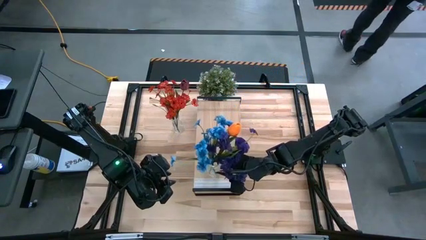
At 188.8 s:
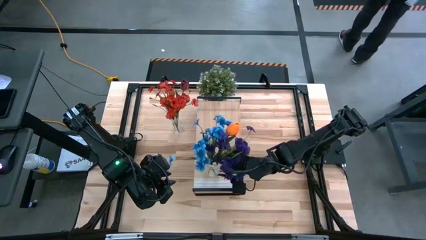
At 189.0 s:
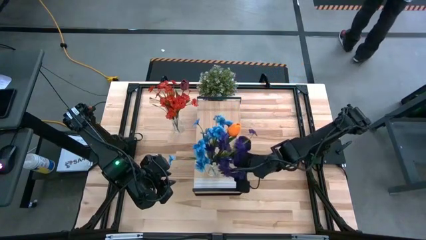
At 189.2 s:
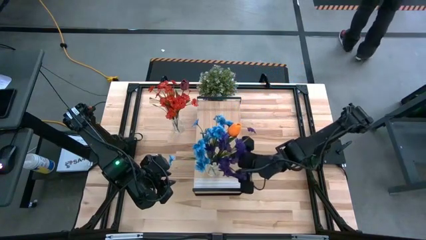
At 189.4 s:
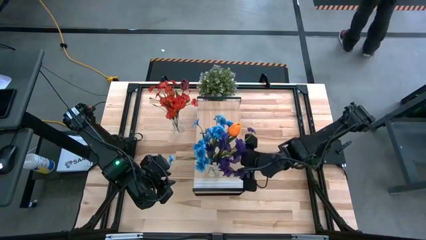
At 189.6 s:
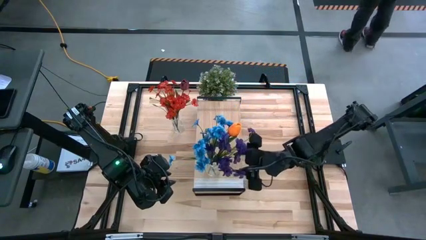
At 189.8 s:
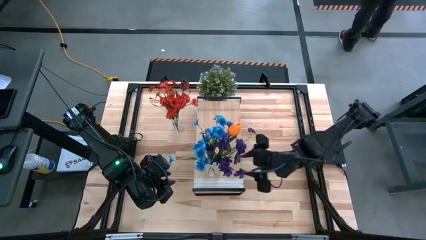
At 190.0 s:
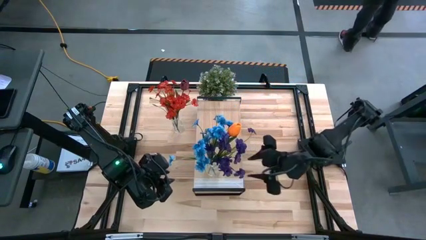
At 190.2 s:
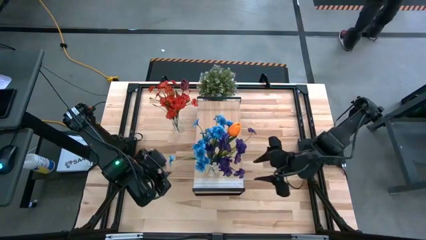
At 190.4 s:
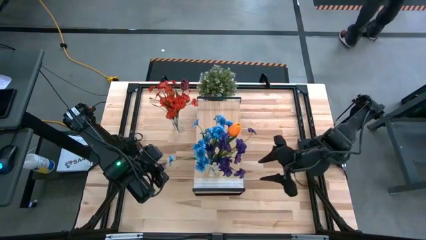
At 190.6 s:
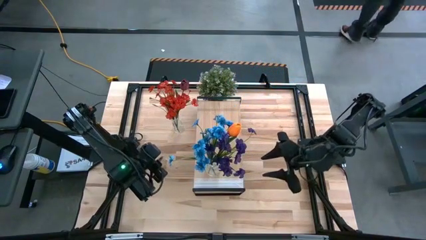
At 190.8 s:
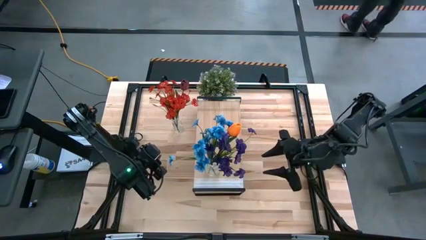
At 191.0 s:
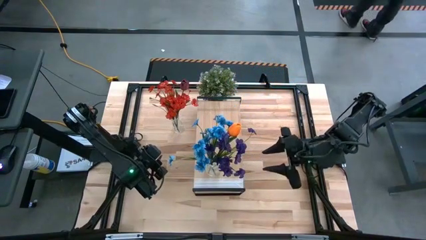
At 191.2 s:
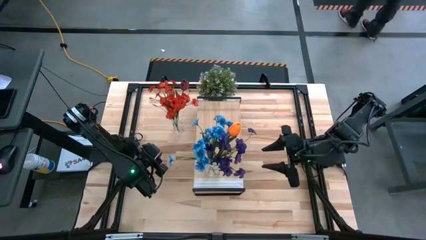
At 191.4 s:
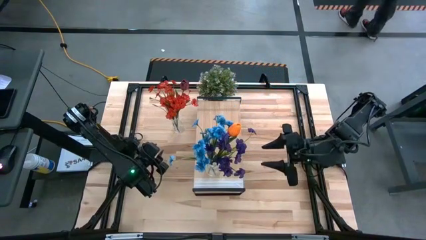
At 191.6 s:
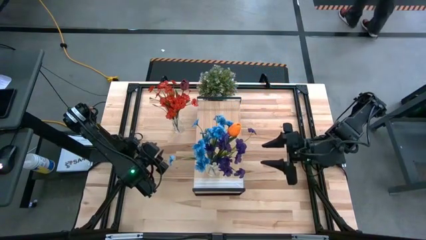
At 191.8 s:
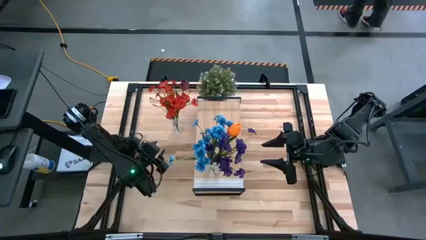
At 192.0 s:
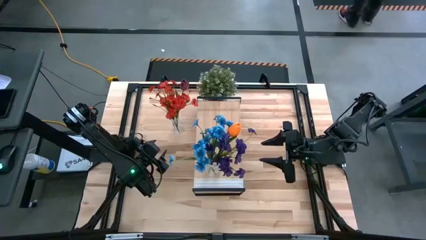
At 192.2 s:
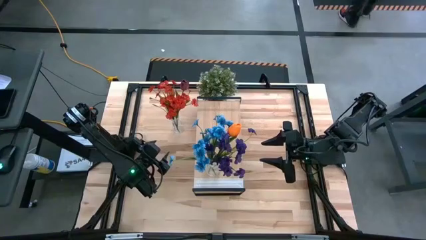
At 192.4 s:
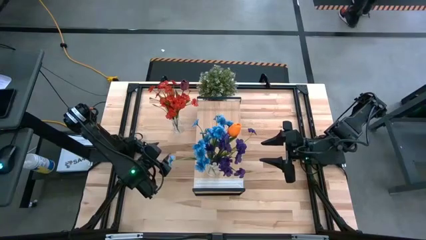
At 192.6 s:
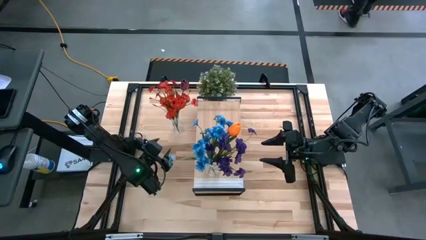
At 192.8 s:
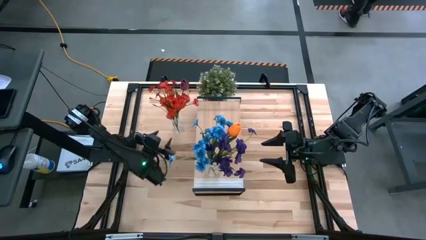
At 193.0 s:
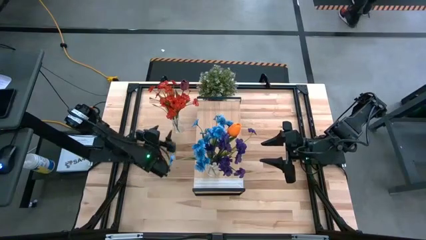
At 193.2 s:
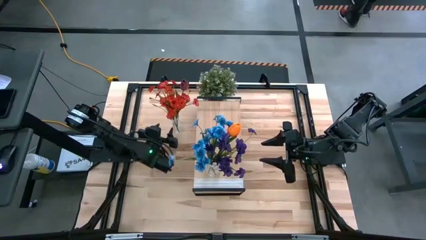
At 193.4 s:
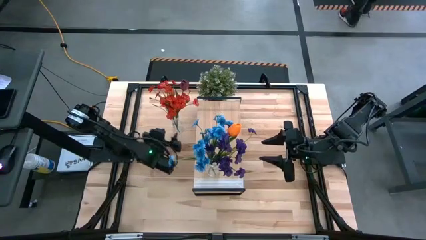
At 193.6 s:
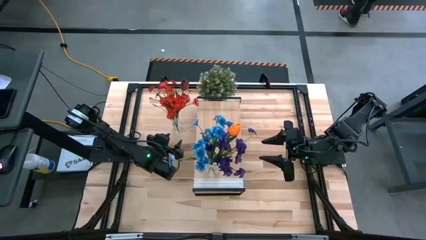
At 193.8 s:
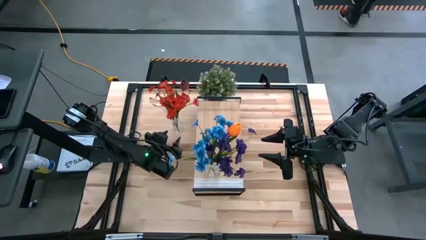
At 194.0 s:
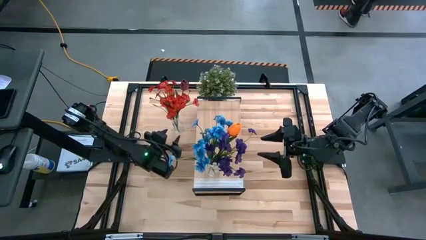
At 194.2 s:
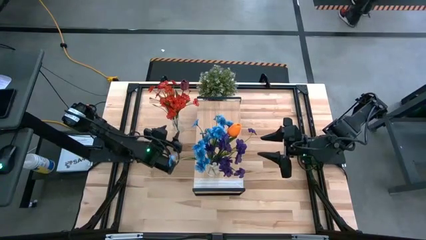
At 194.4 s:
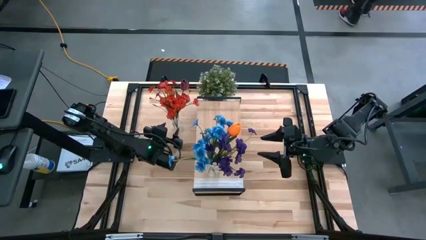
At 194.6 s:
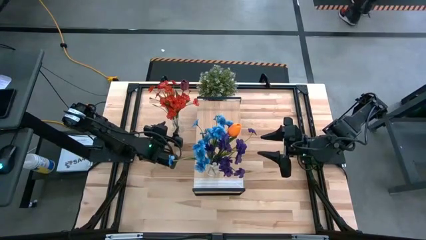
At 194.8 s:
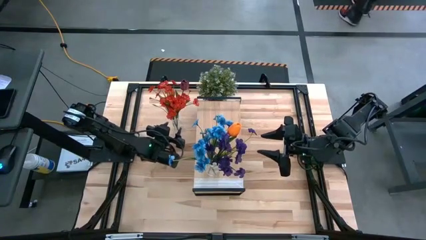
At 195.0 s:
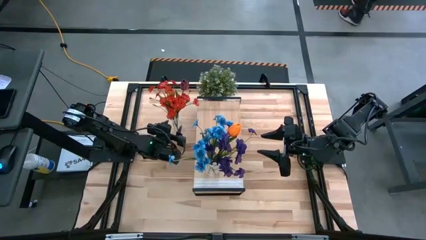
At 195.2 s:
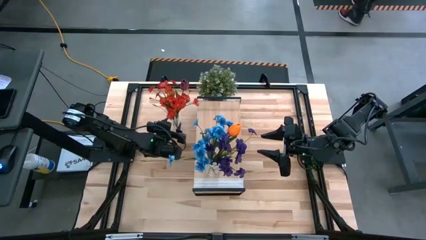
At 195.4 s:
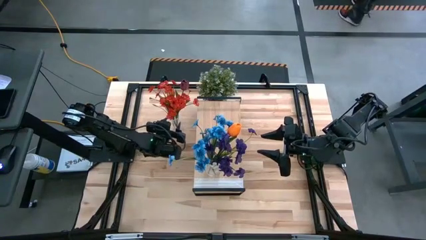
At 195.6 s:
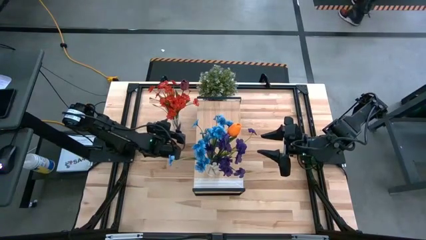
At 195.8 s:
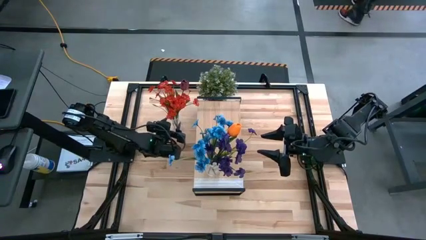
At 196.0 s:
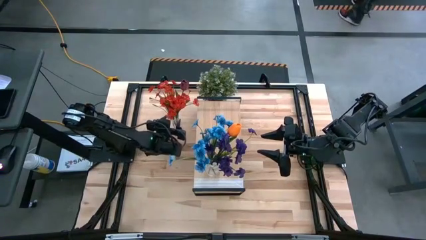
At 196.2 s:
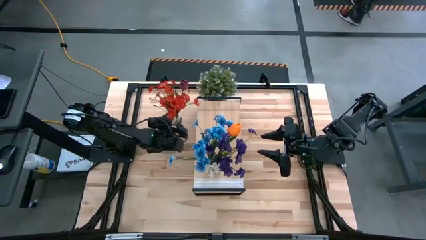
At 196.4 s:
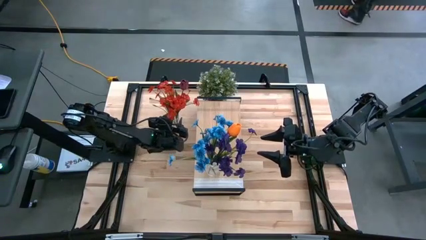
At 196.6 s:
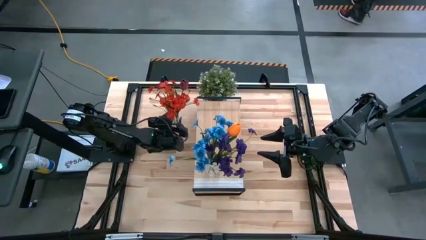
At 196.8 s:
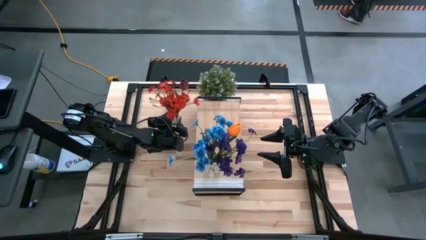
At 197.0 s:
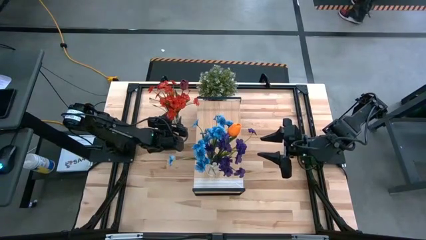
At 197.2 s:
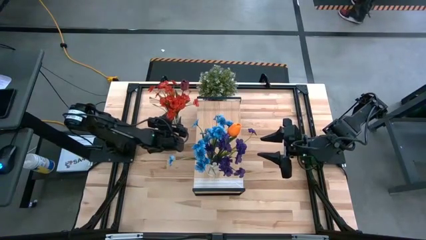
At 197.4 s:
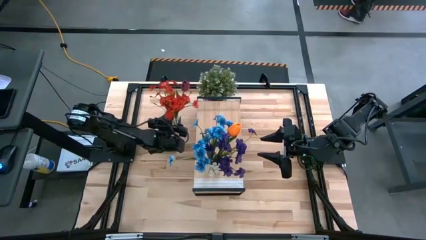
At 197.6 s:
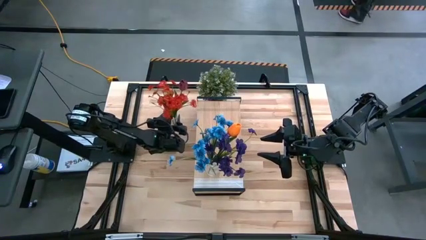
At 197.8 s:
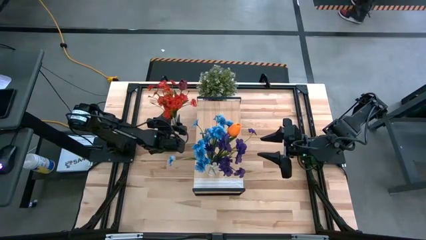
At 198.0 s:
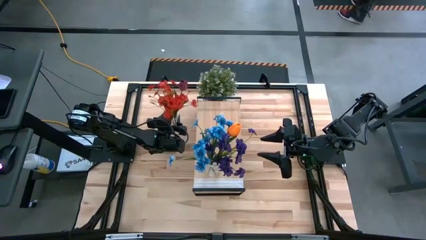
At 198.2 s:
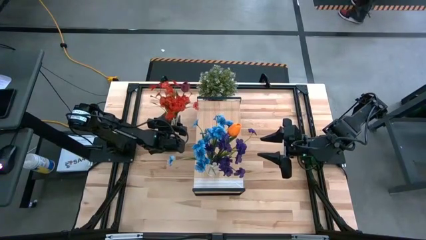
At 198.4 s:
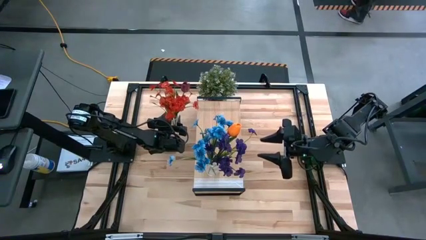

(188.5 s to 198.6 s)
Task: Pick and place flowers into a vace then onto a shelf
Put the left transparent vase on the shelf

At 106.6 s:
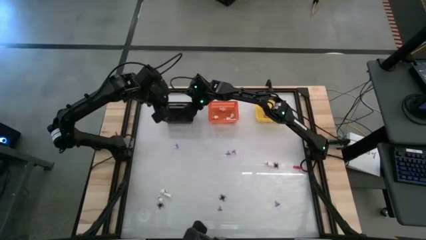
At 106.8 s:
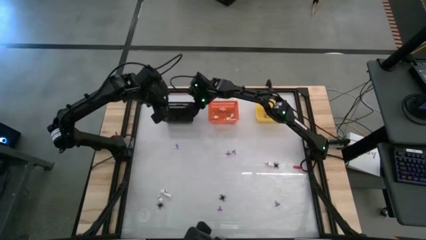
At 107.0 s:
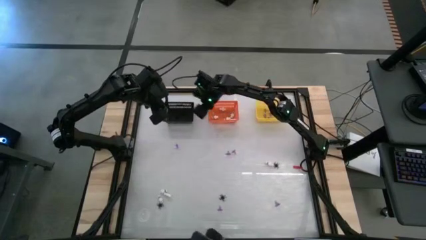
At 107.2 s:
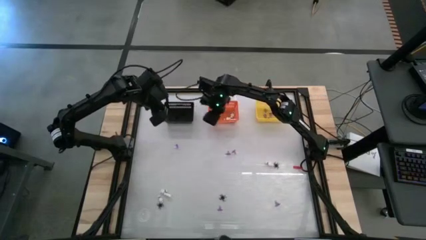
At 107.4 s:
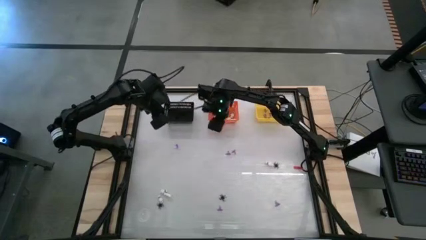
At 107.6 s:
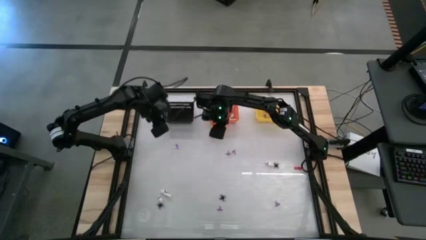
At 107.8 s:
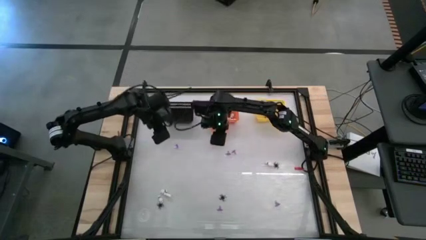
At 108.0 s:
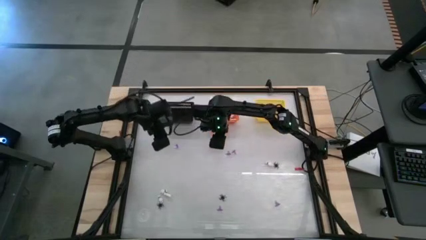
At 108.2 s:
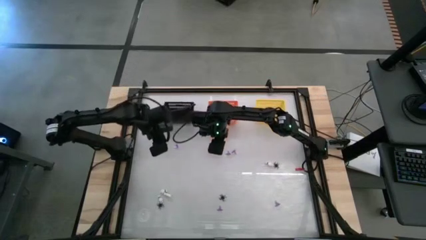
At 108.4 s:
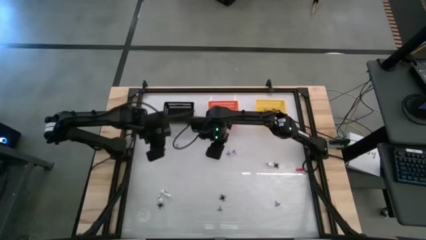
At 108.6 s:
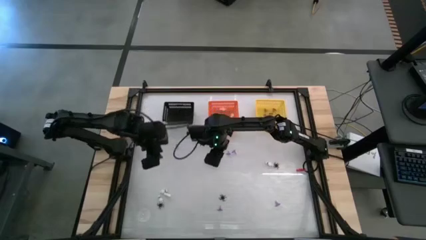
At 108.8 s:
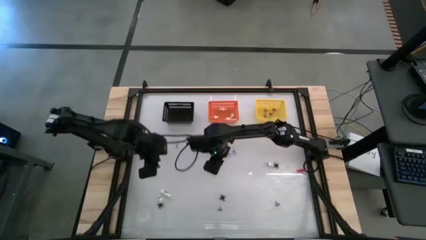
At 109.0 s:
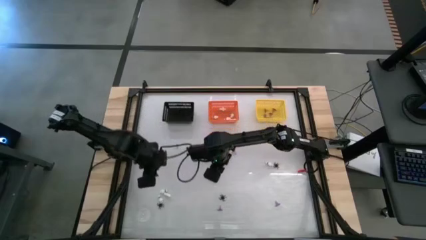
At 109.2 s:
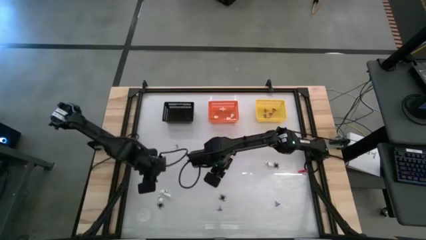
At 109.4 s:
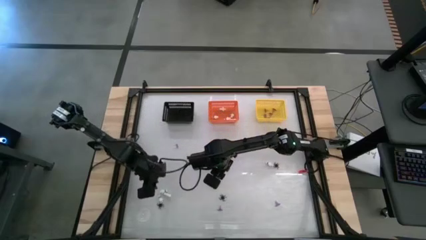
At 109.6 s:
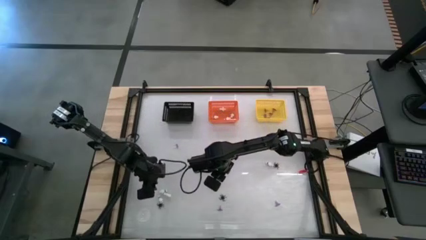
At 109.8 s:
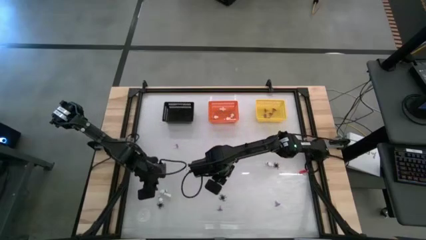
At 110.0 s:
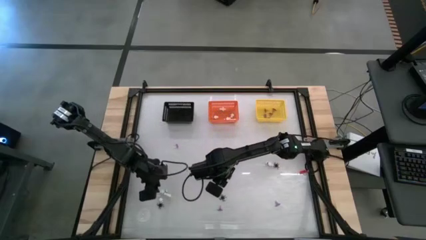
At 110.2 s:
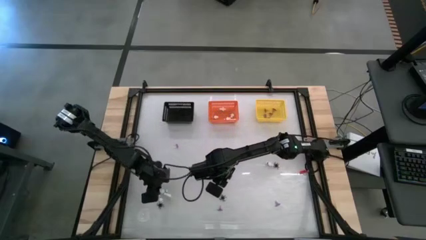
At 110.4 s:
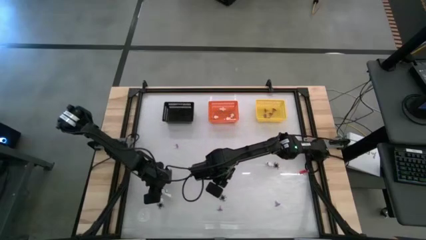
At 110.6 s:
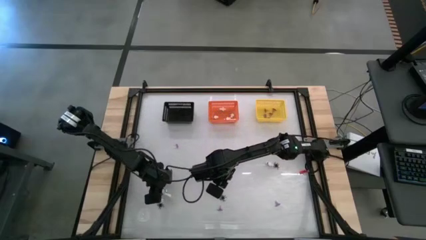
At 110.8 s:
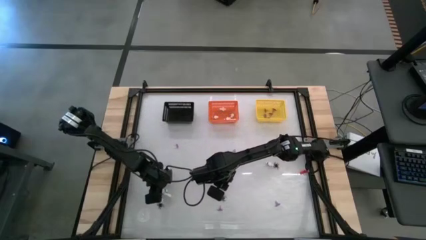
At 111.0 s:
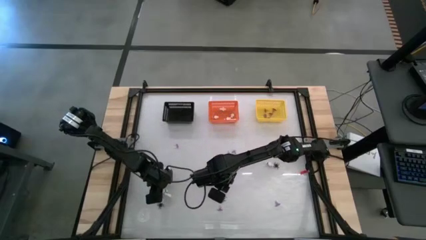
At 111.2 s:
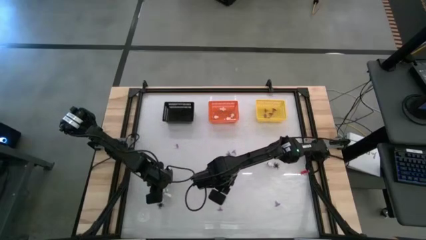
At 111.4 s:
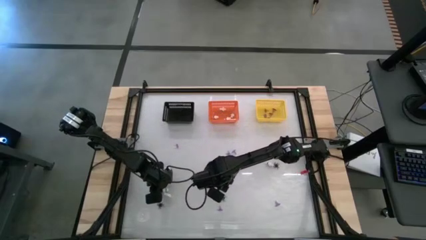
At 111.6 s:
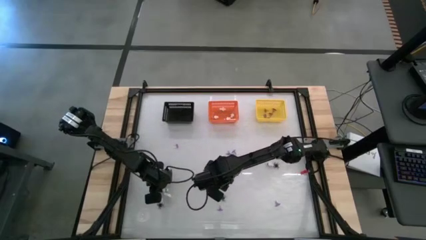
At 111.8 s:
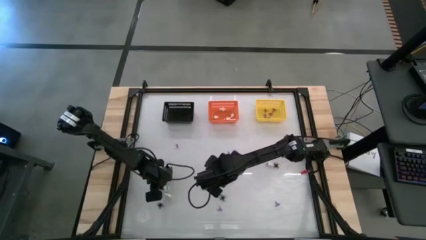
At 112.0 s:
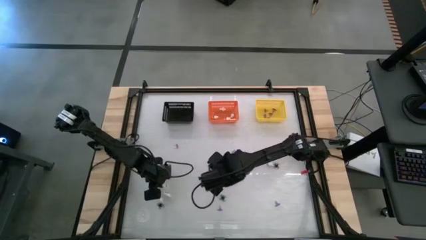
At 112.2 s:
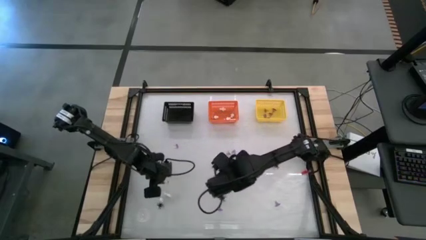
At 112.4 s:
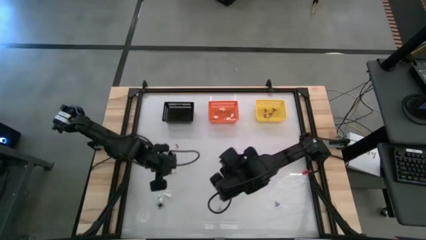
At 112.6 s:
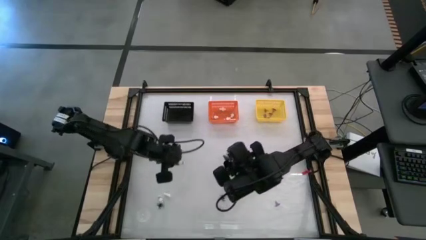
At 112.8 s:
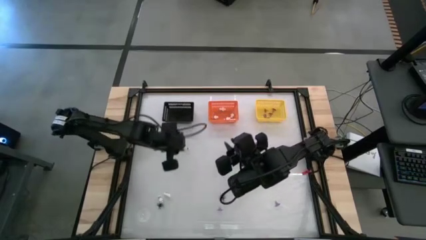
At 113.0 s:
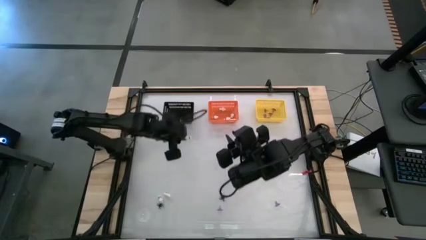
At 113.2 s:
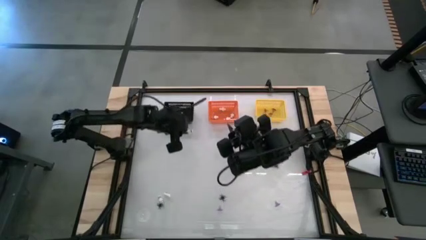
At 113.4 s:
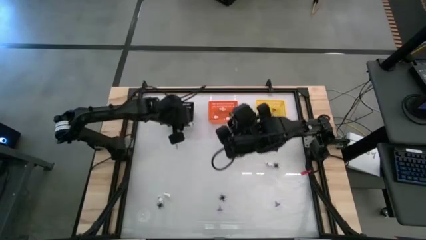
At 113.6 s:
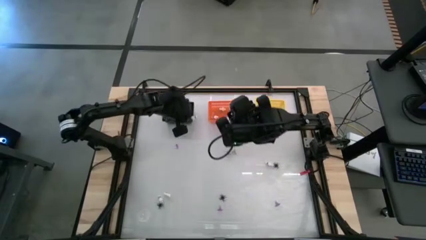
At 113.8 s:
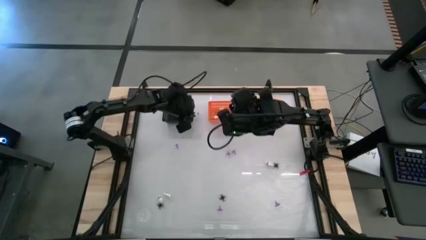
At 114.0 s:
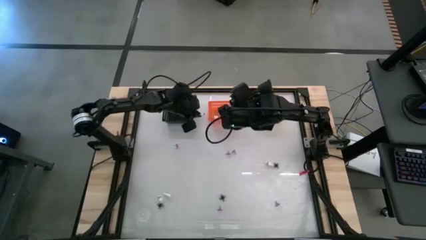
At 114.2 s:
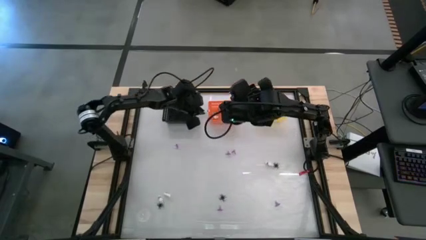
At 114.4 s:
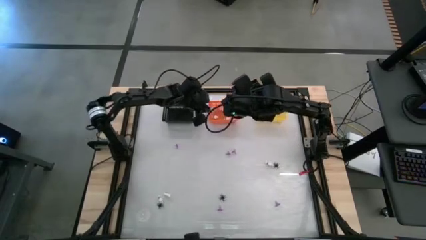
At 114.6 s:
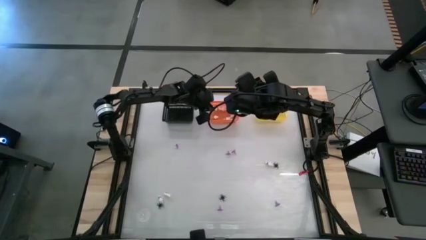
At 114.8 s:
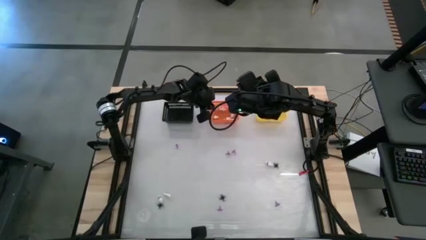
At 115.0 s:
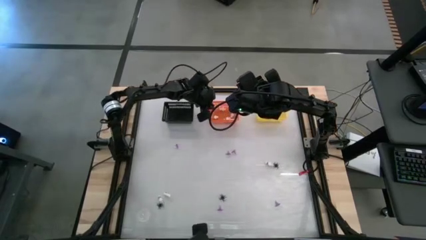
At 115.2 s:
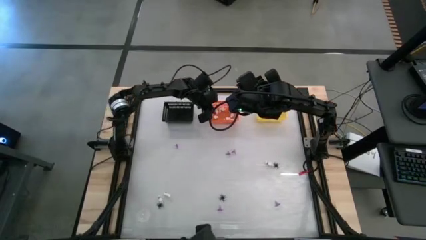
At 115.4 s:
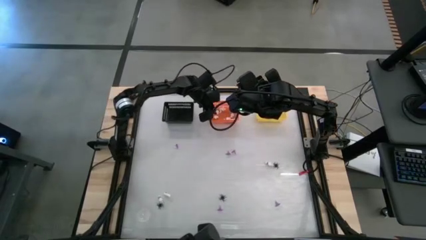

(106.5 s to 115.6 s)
Task: Sort Halloween decoration
Put the skeleton toy into the orange bin
